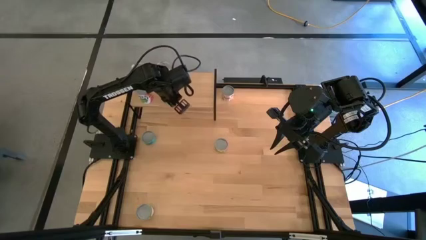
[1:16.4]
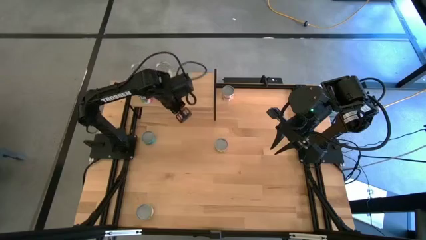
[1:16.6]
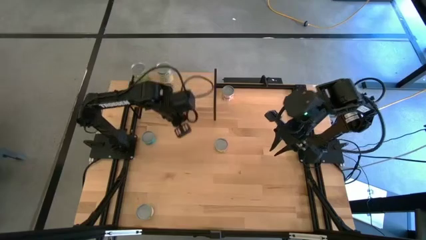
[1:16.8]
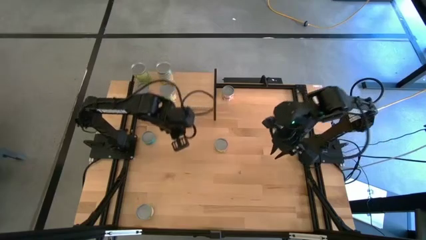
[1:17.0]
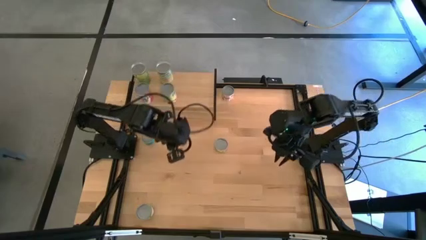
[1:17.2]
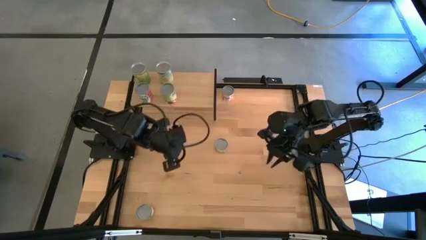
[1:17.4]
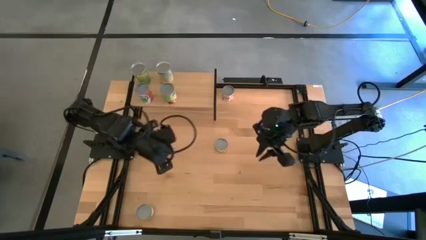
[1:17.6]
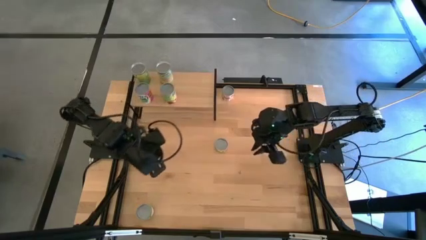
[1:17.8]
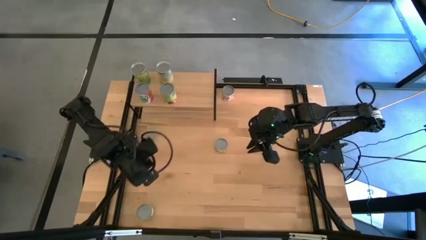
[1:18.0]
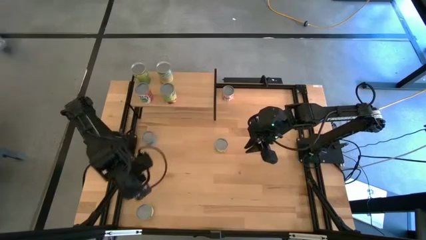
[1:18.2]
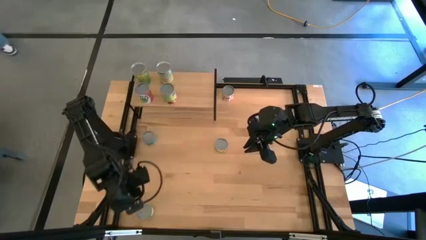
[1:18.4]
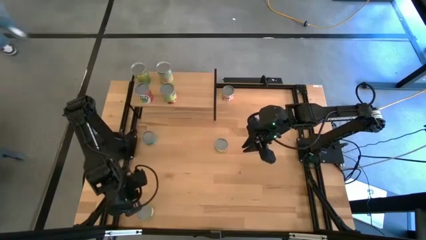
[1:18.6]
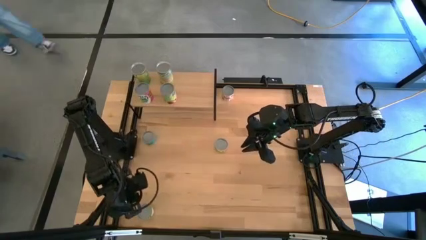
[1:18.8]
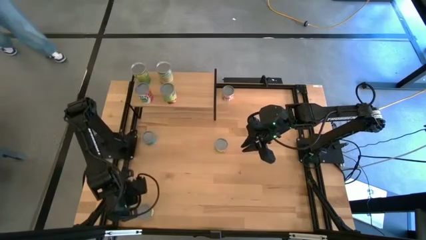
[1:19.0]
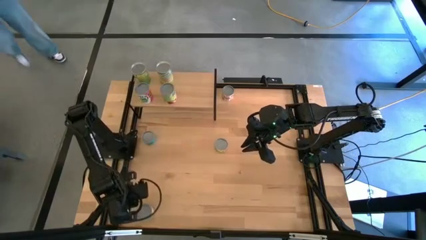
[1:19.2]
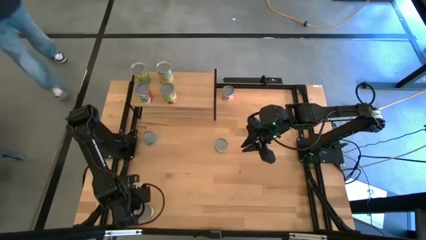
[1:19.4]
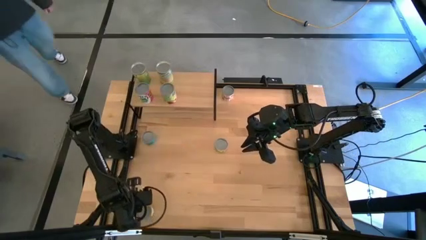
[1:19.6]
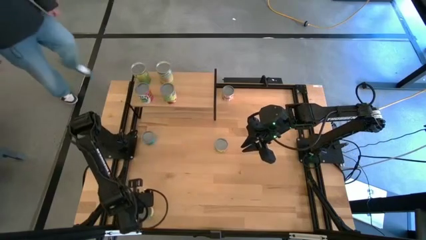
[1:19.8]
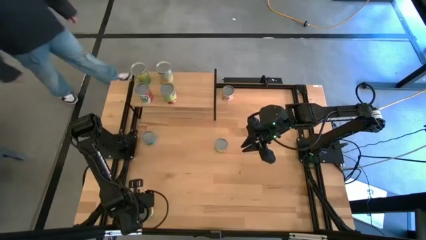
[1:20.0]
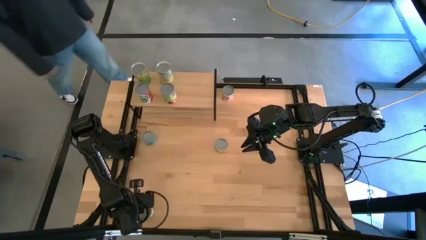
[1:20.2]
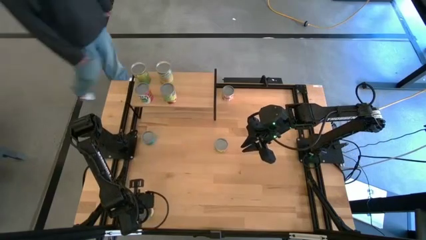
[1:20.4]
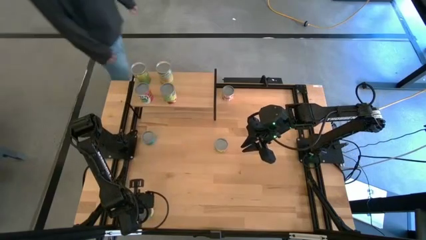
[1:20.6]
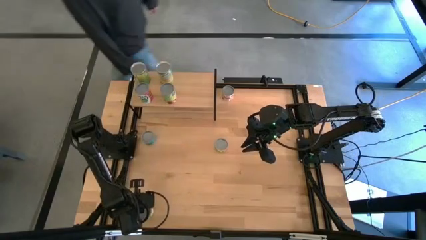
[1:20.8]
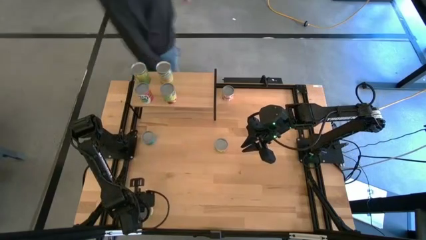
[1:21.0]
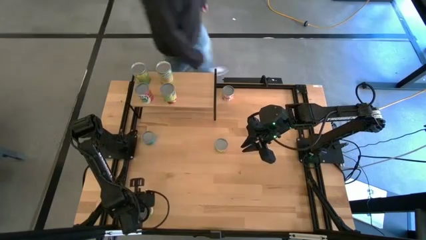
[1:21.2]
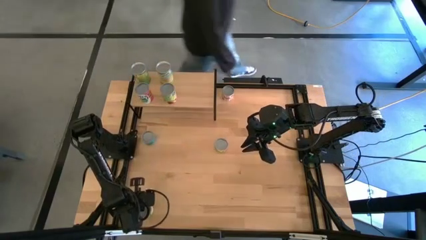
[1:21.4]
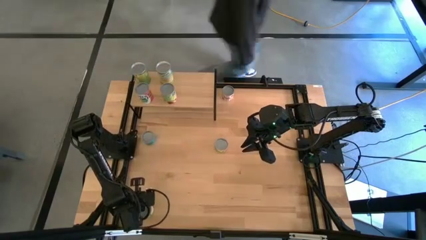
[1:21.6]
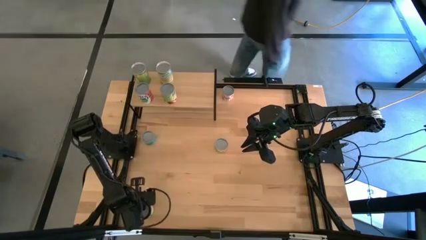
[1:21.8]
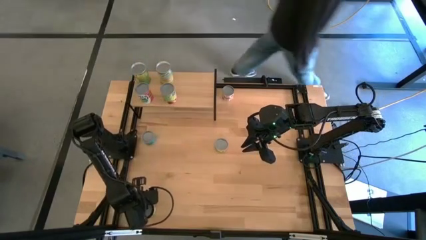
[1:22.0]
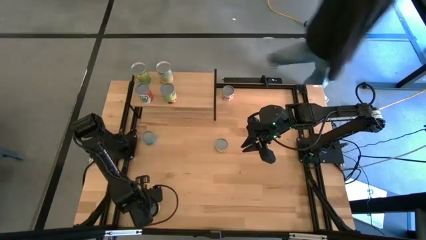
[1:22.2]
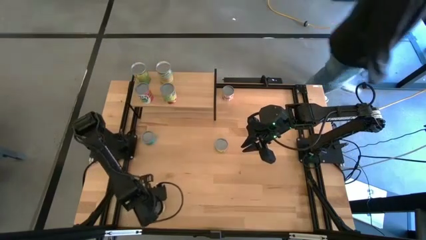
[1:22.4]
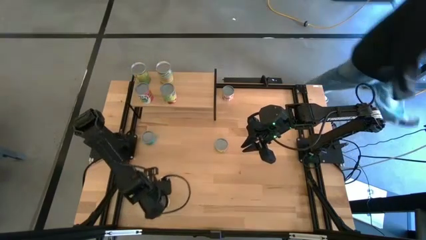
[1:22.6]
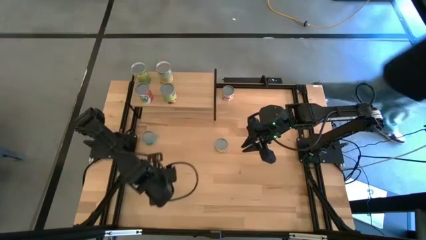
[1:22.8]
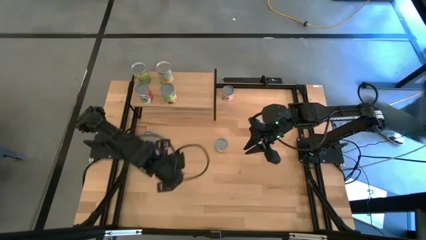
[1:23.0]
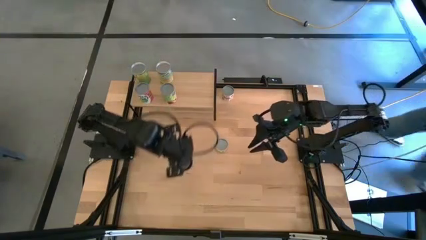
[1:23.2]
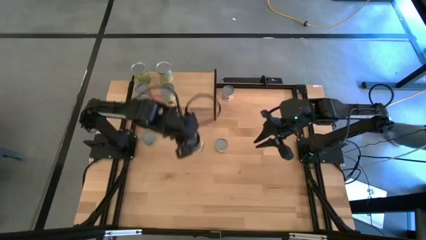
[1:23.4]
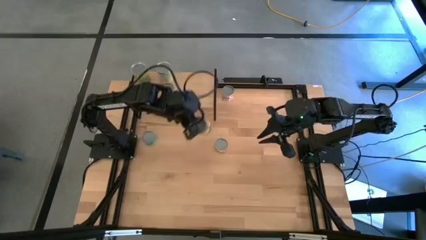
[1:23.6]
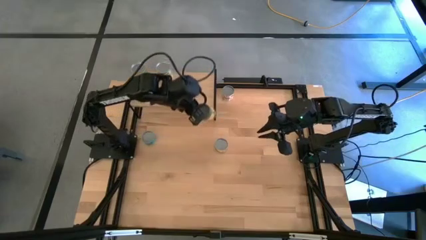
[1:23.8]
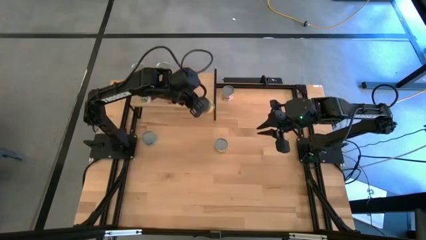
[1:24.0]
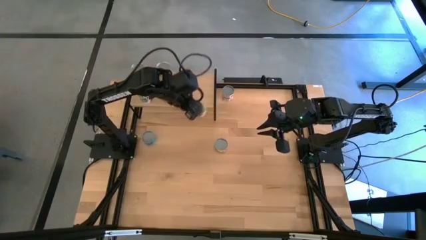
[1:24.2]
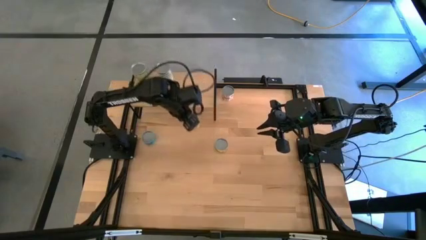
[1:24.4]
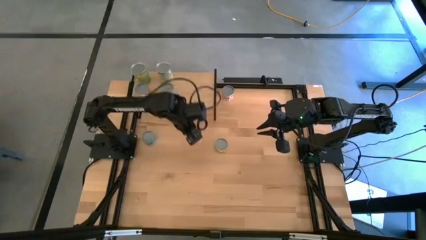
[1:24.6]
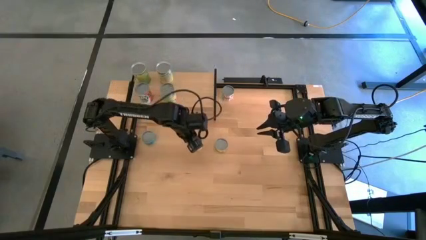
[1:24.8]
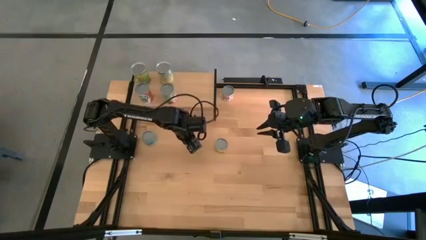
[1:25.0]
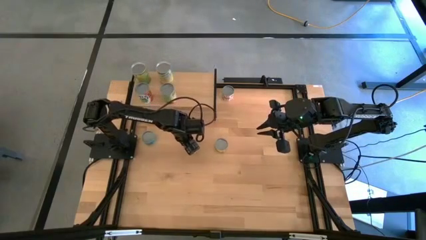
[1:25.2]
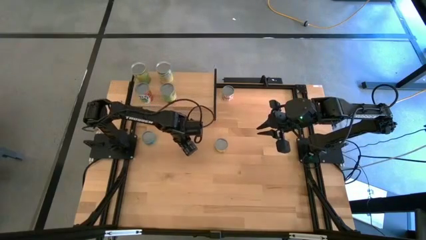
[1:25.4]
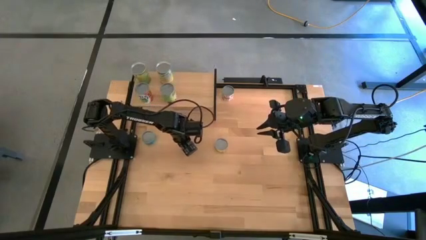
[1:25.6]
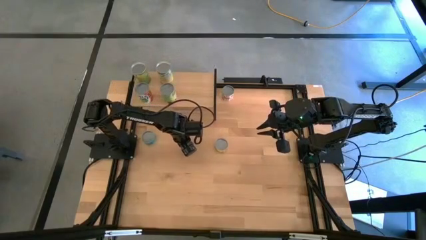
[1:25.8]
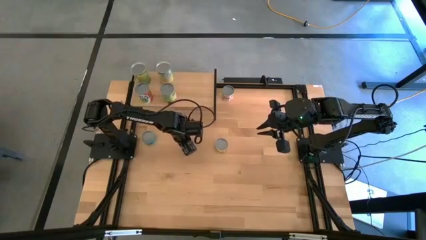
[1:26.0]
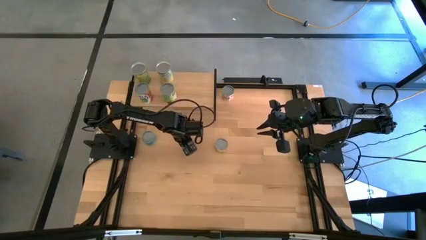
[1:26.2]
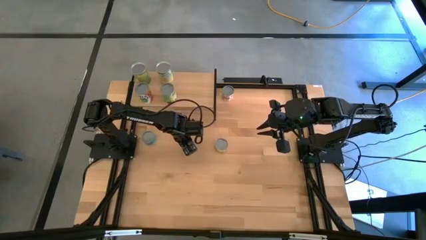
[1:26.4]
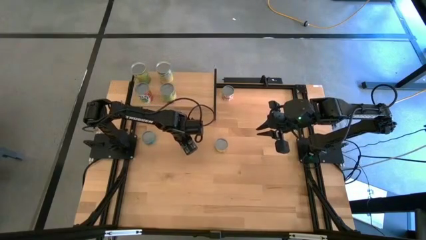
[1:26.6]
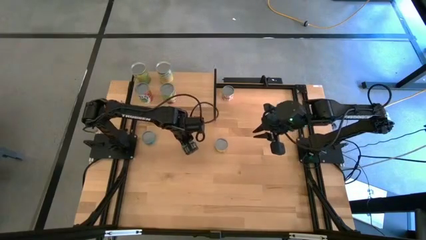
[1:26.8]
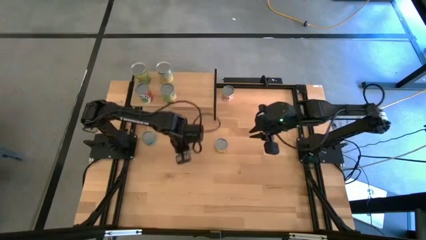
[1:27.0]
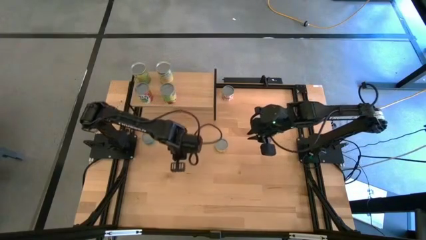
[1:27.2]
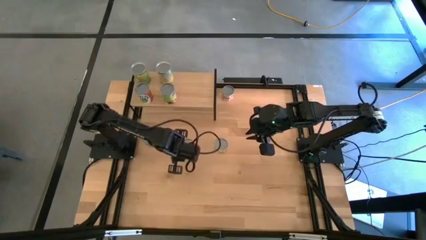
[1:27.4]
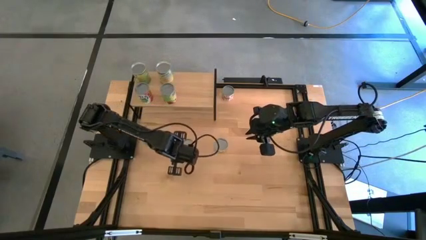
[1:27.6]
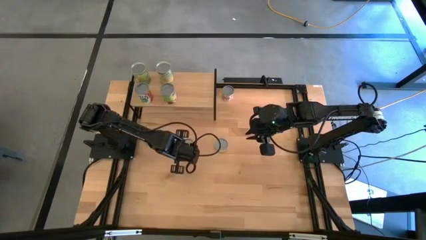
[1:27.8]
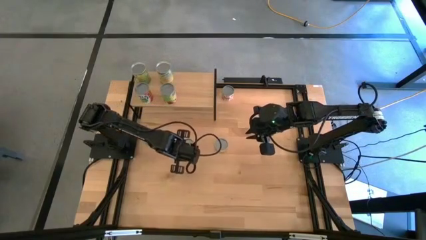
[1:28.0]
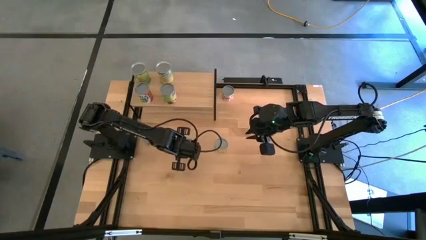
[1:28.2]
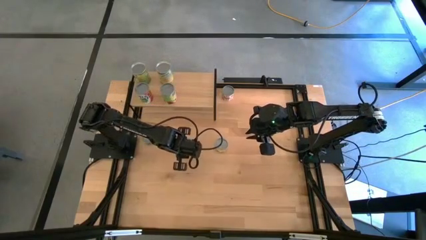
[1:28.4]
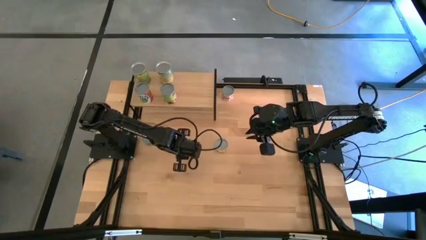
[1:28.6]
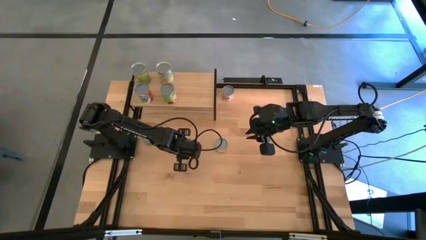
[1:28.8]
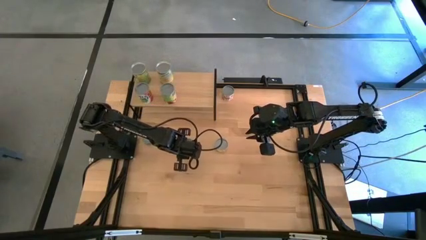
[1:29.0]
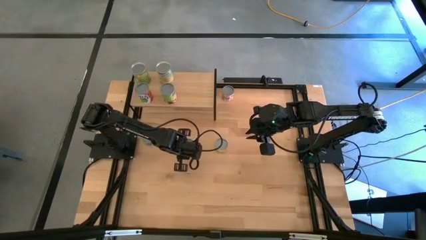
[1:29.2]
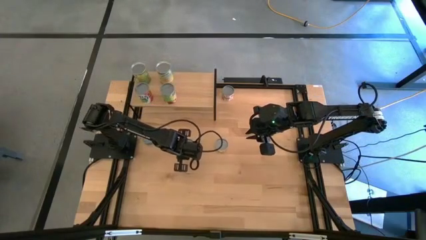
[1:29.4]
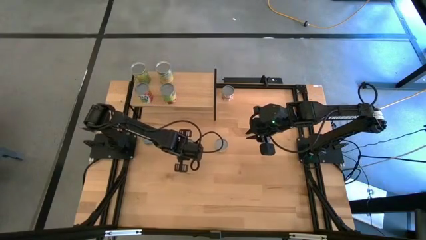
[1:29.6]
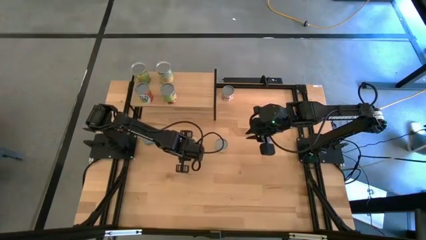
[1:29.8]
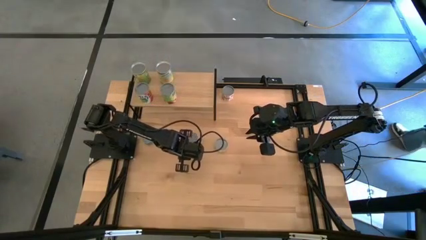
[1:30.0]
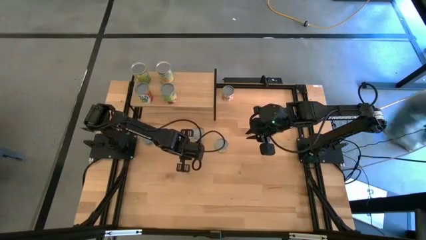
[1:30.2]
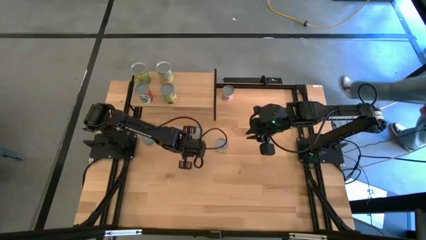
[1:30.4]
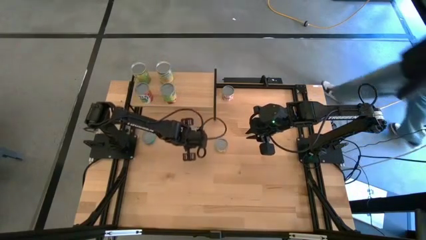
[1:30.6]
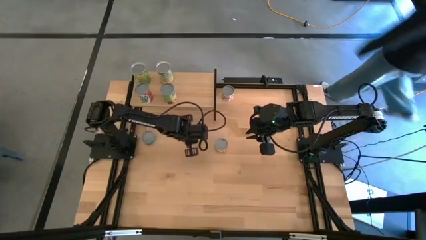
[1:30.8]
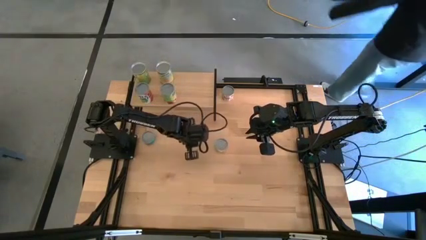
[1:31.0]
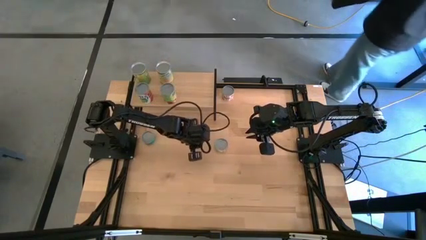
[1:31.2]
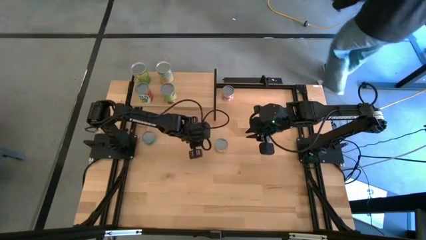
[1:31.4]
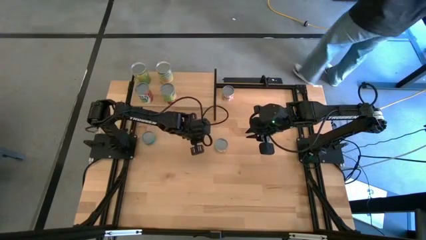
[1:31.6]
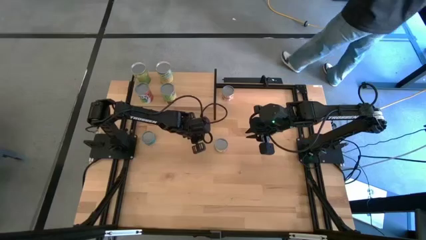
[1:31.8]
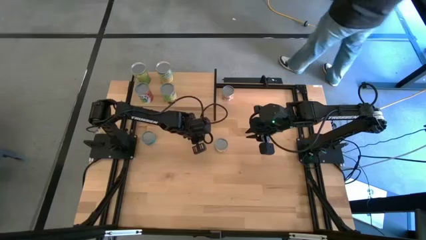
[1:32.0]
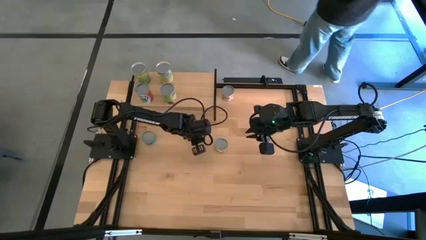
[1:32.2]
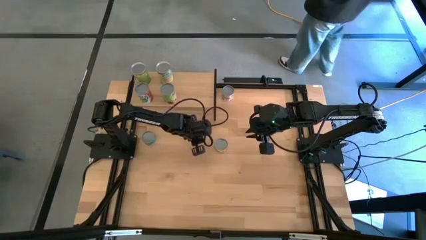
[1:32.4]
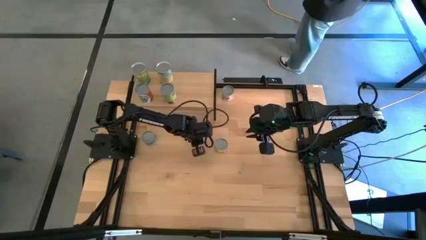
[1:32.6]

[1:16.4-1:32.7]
Task: Pick and place cans onto a shelf
Put the canned peaches on the shelf
